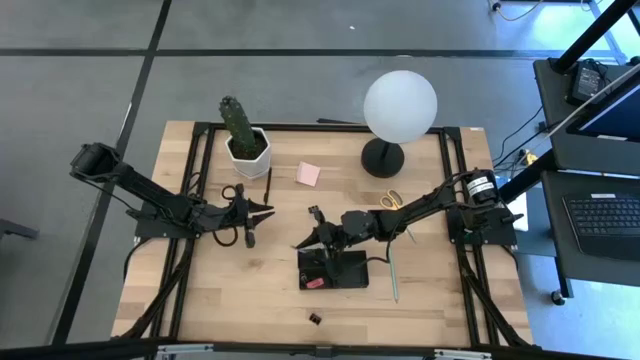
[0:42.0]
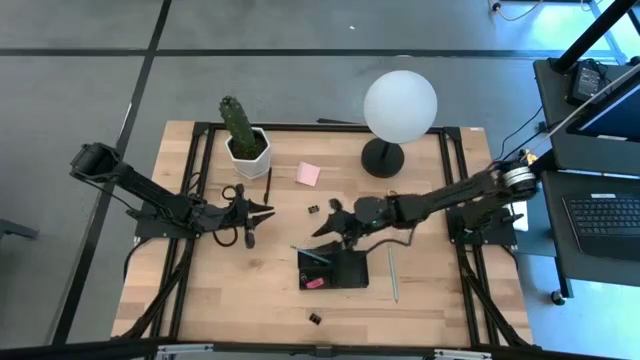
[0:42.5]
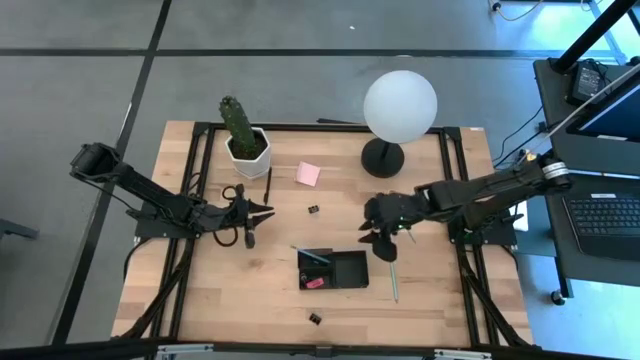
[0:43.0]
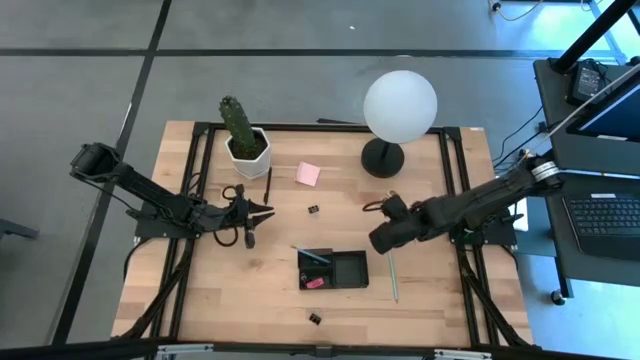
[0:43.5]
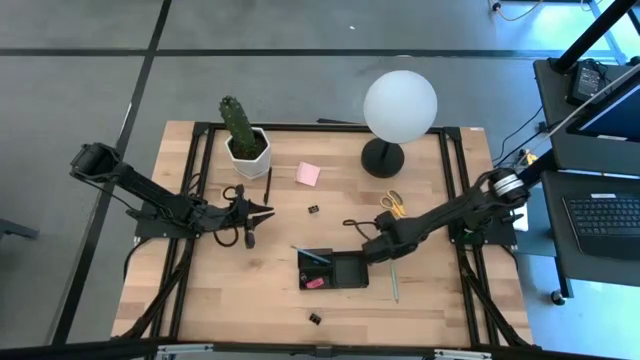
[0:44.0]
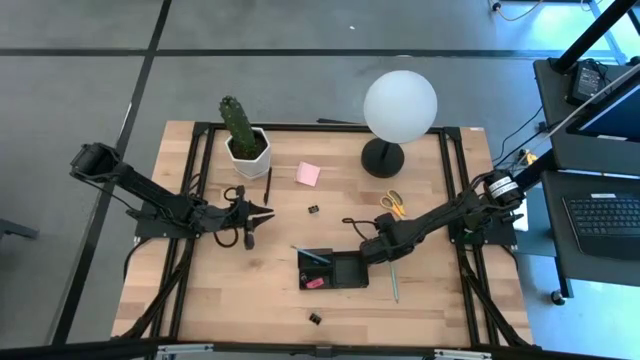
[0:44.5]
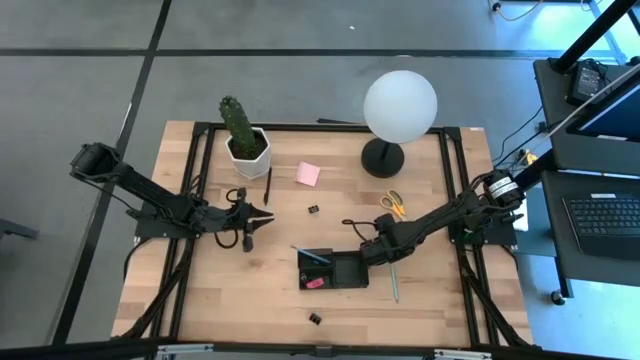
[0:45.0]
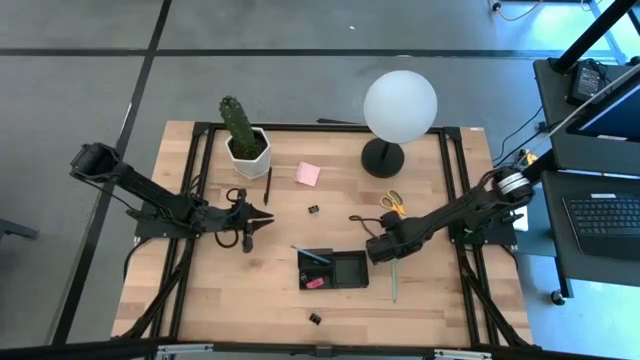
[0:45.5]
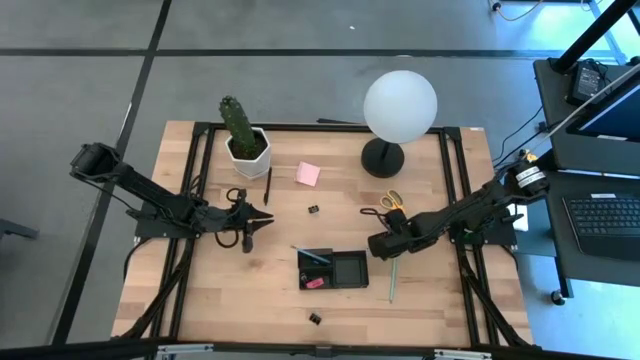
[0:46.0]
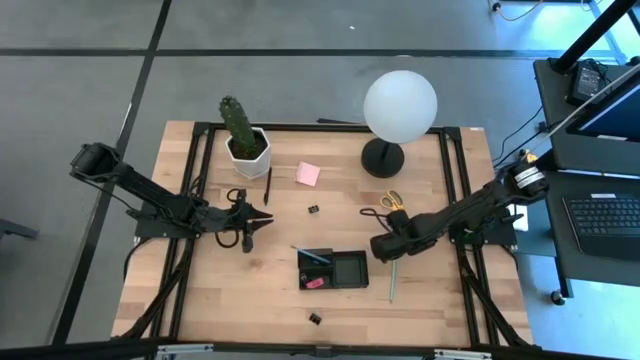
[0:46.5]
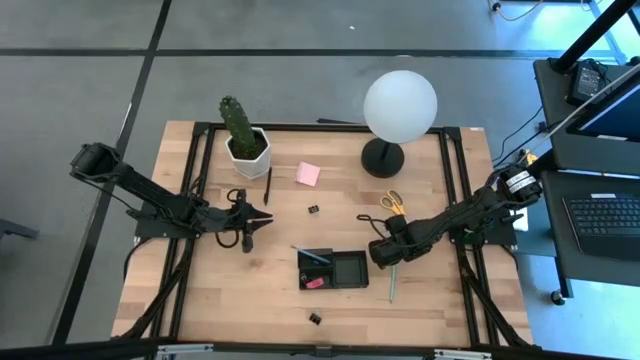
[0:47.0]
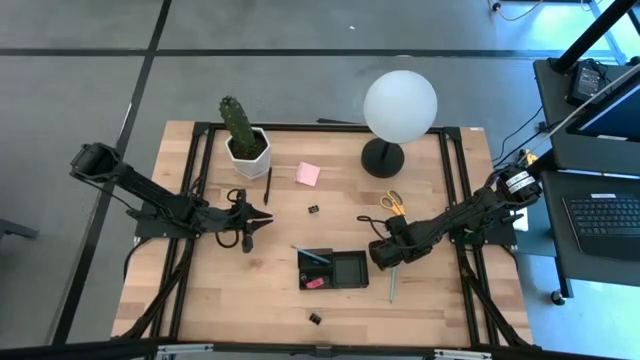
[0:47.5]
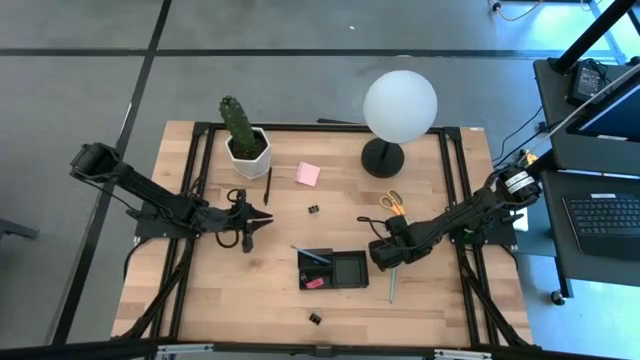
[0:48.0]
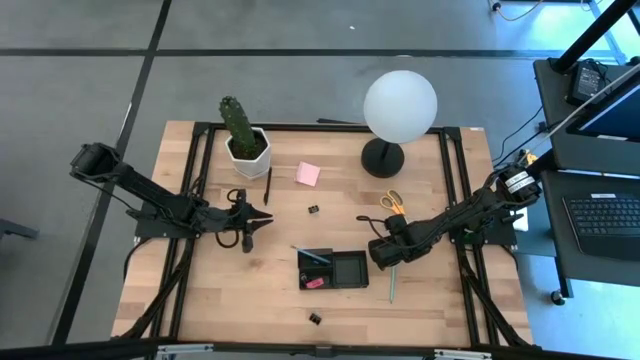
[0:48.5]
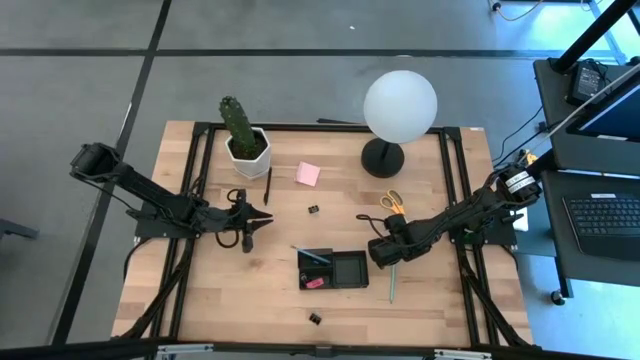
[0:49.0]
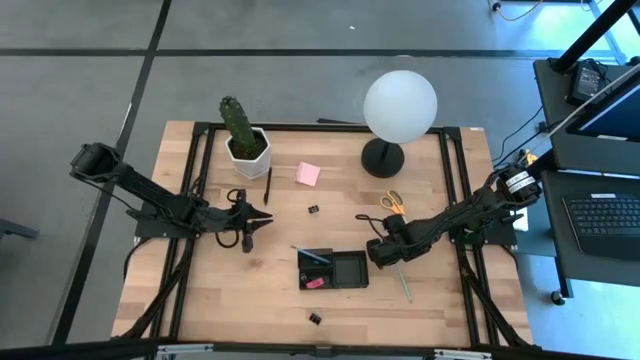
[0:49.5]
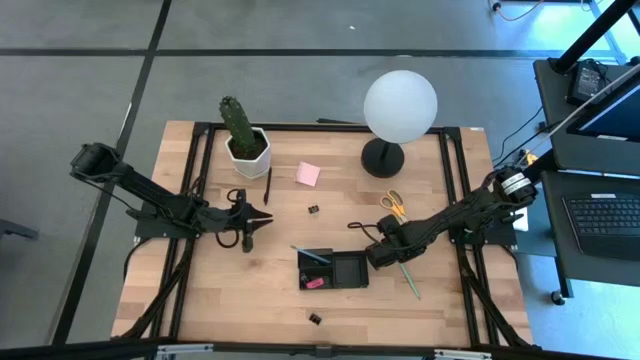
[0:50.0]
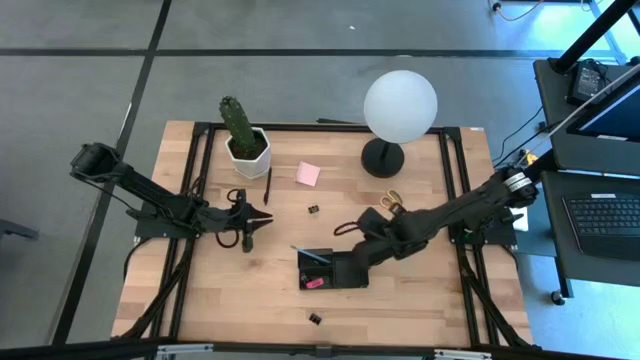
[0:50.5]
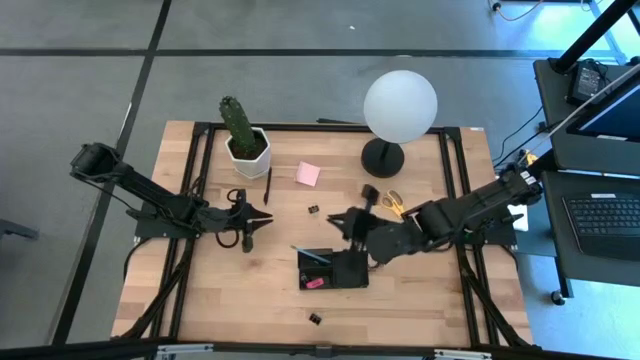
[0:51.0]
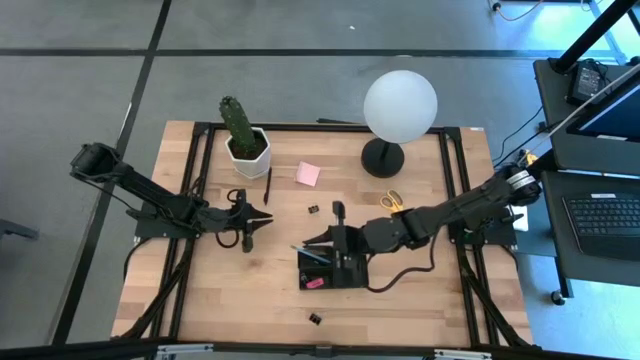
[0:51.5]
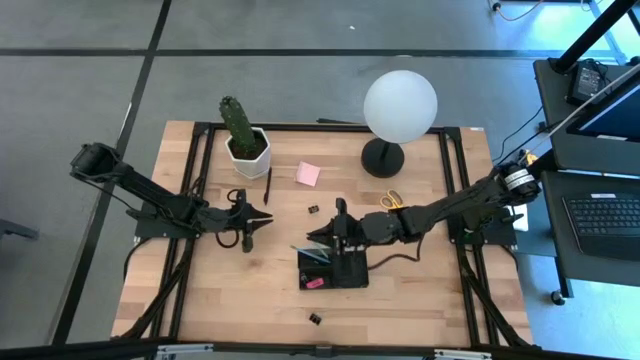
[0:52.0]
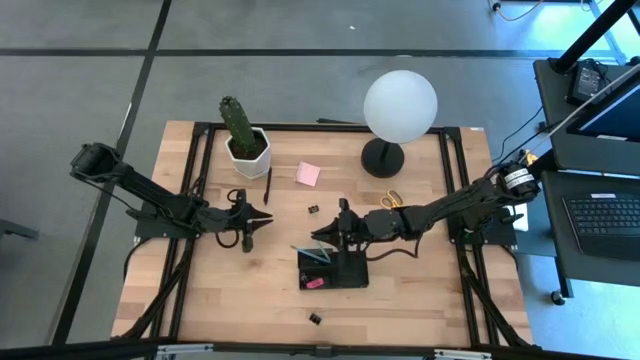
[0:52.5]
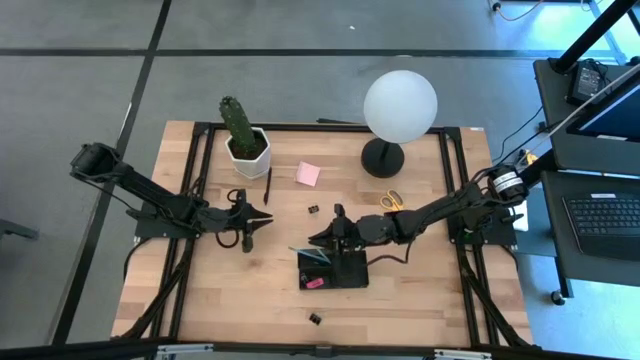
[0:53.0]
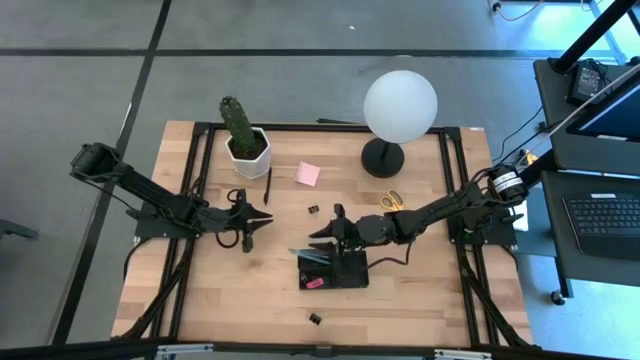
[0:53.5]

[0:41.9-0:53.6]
Task: Pick and place office supplies into organizer
Put the green pencil into the mesh desk organizer

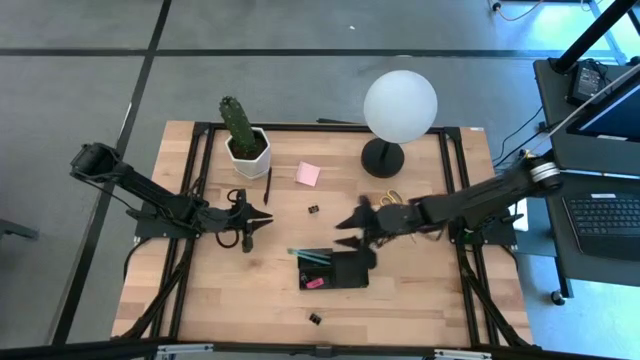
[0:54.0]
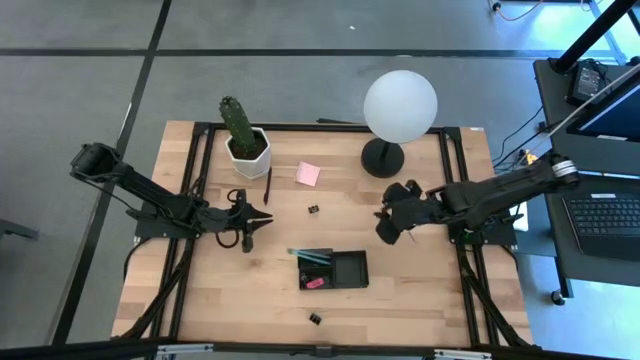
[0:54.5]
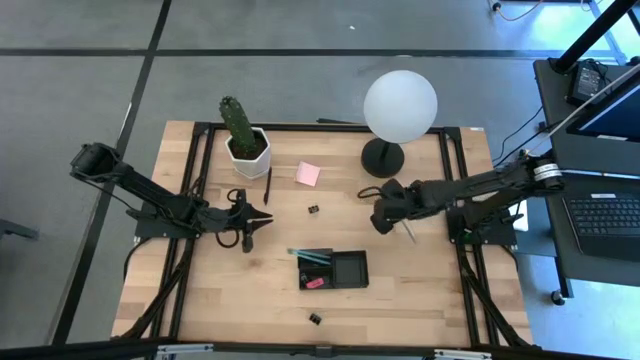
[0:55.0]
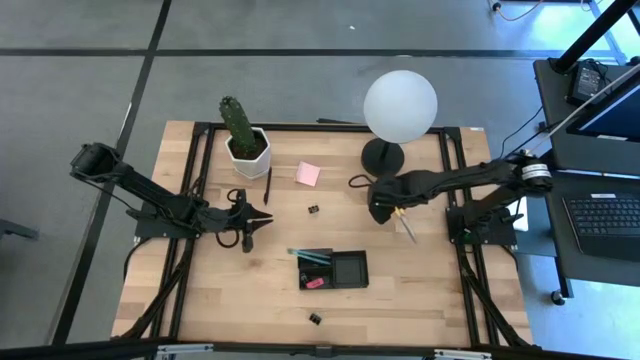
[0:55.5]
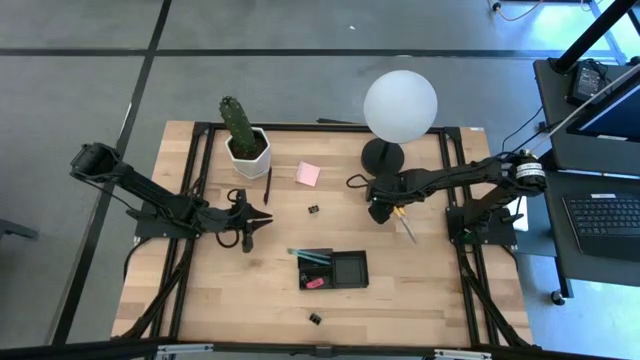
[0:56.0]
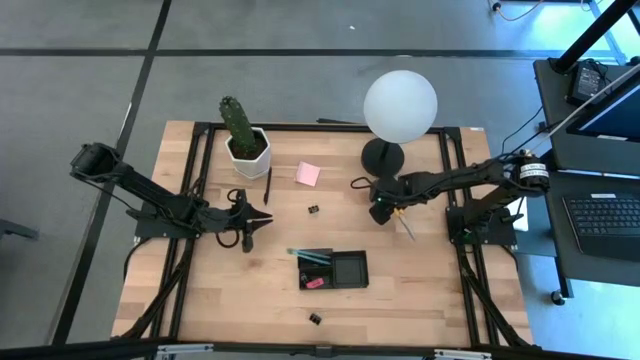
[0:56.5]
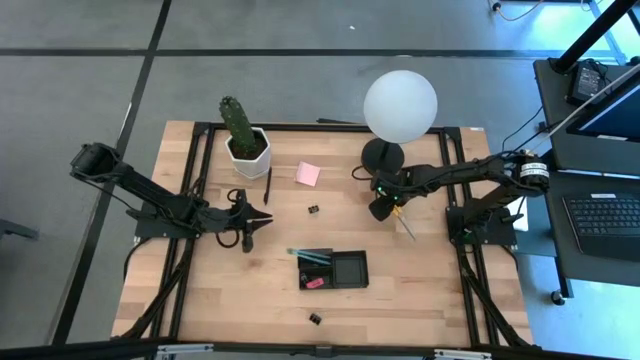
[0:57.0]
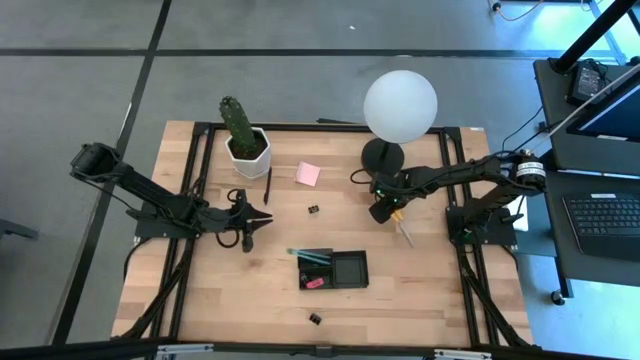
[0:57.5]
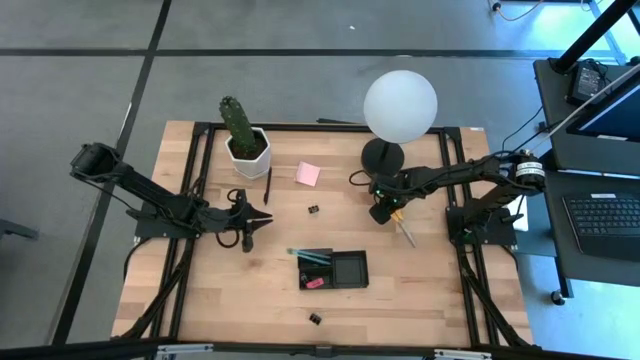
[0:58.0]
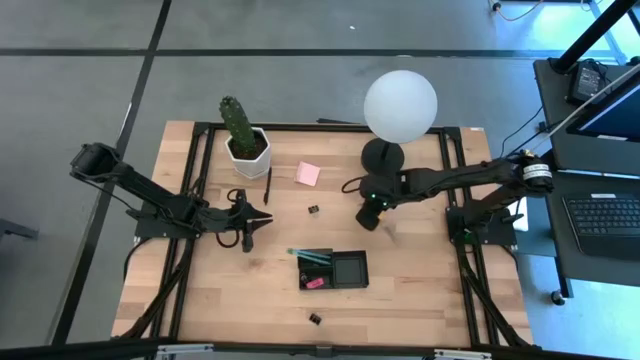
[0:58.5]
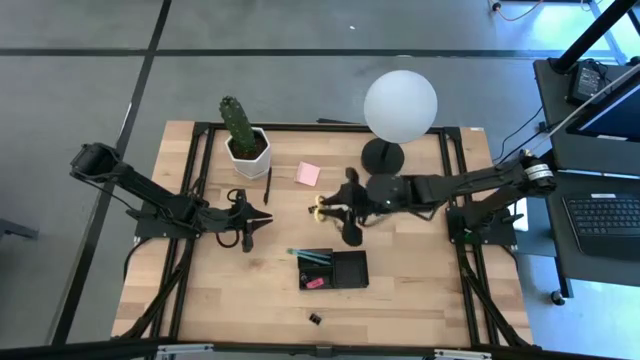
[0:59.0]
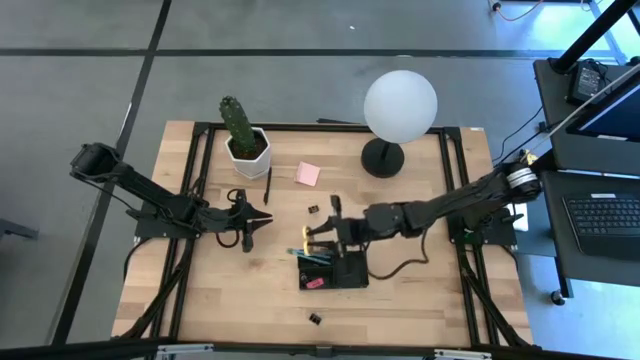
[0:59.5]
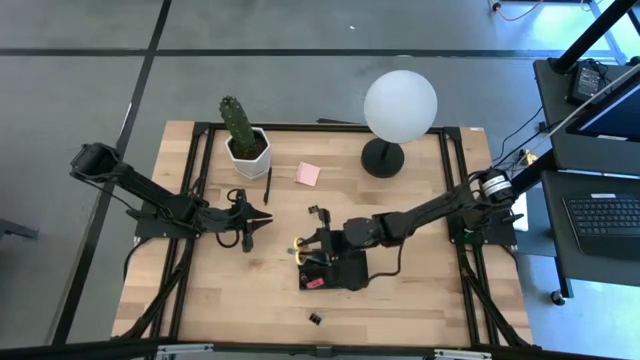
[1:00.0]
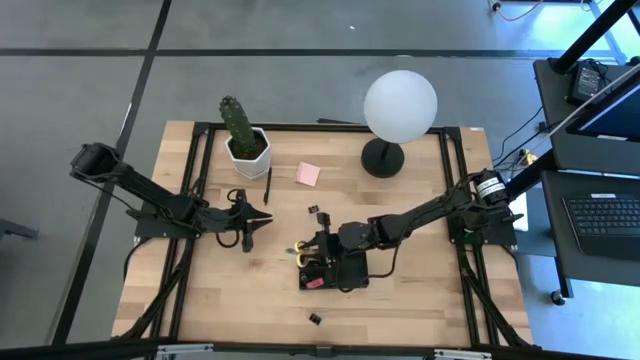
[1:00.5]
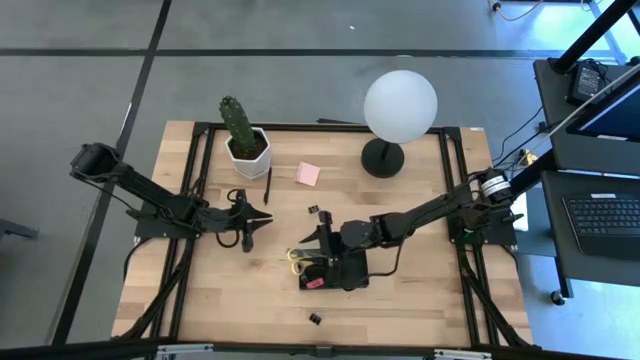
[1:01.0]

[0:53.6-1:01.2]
Put the yellow scissors into the mesh desk organizer

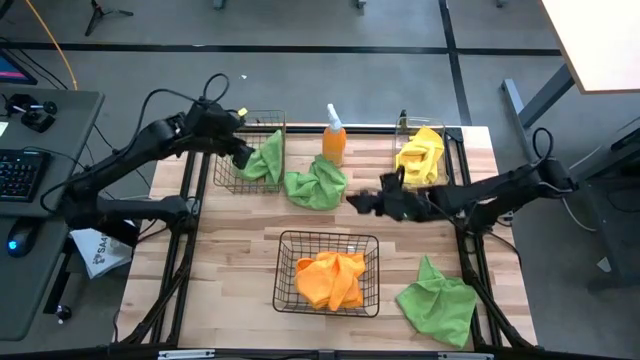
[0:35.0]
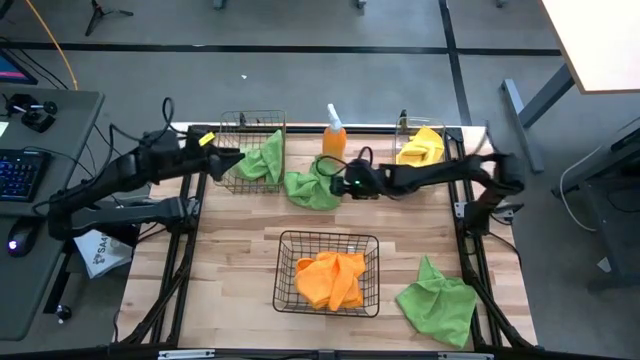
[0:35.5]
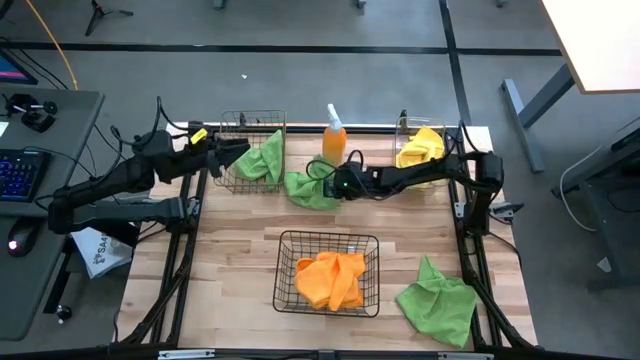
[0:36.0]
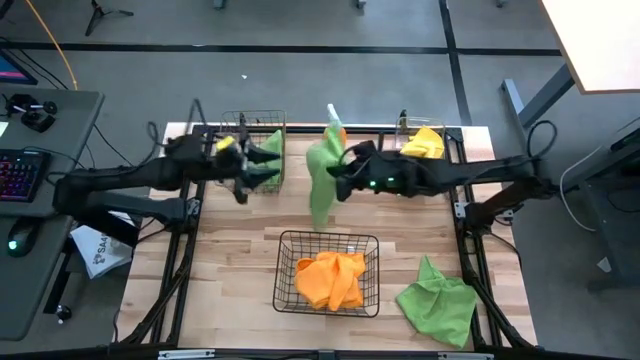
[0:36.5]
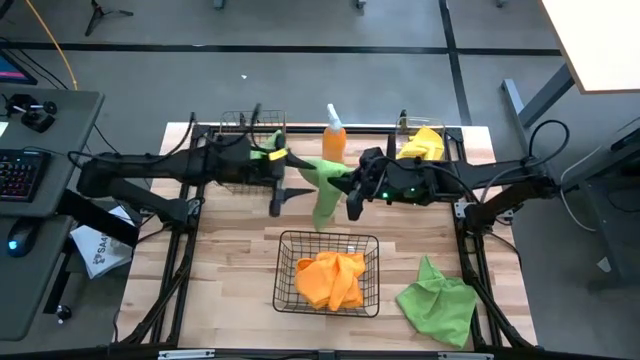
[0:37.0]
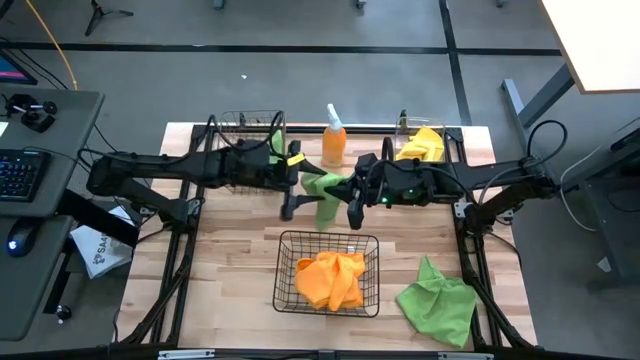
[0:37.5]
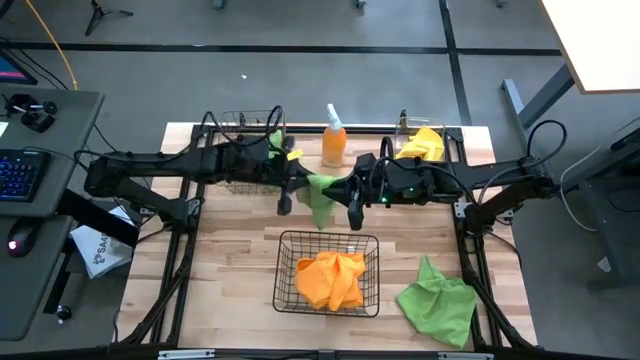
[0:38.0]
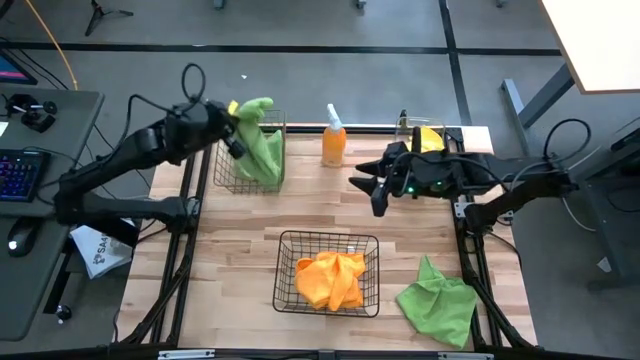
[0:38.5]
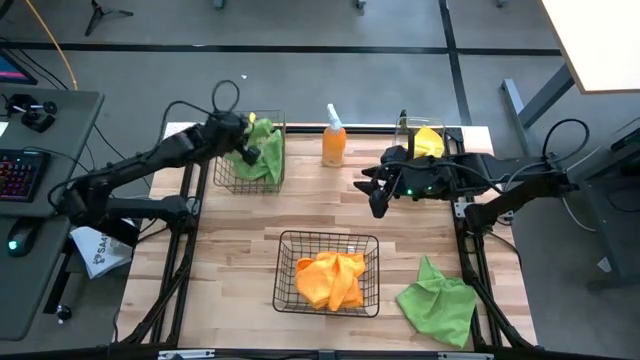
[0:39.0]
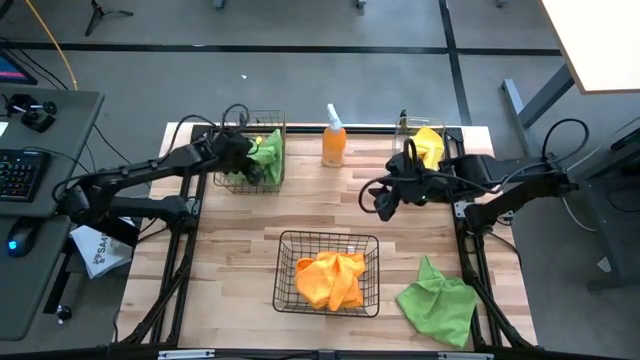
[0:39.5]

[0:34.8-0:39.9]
Task: Sort microfiber towel by color & place in baskets
Put the top green microfiber towel into the gold wire basket
